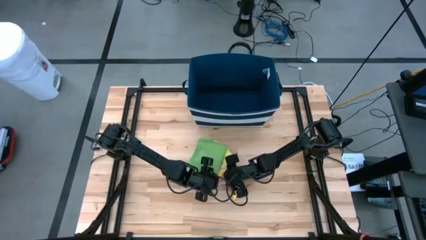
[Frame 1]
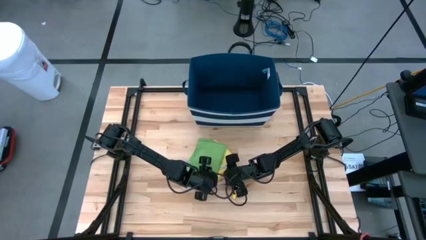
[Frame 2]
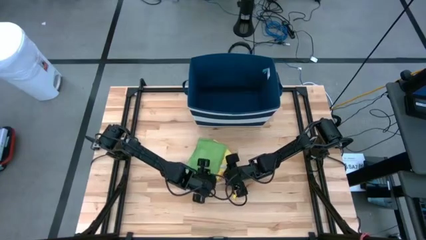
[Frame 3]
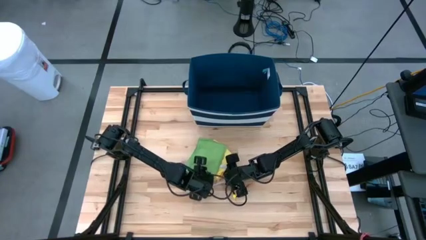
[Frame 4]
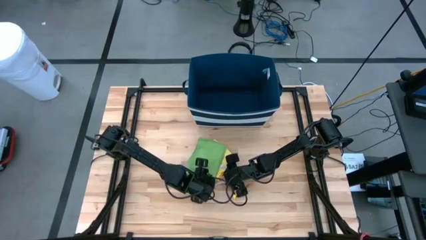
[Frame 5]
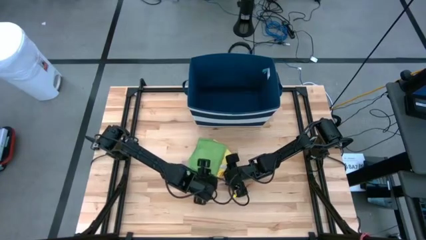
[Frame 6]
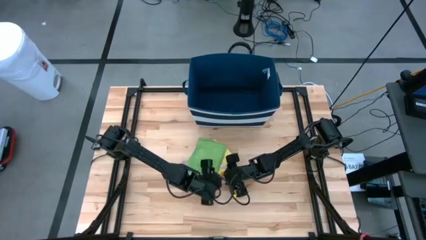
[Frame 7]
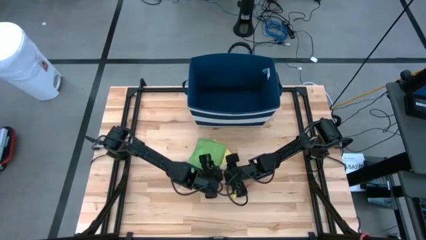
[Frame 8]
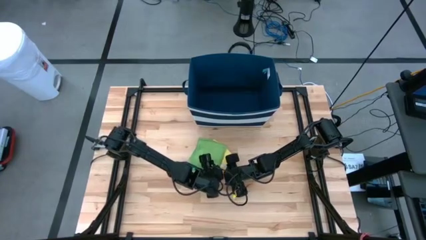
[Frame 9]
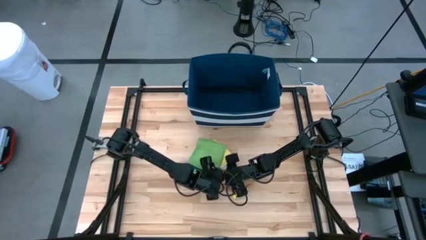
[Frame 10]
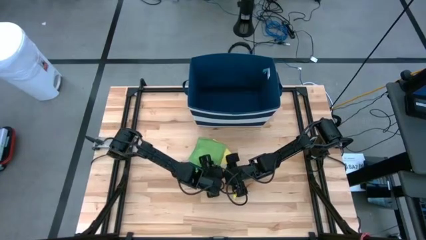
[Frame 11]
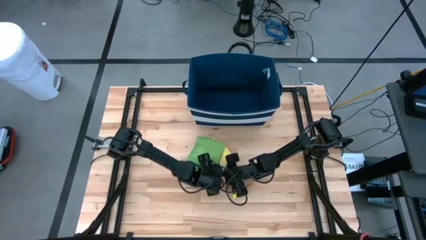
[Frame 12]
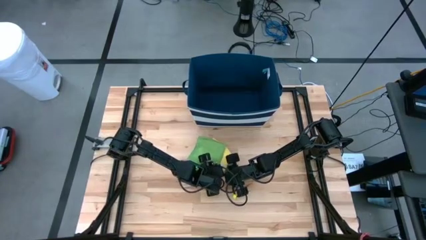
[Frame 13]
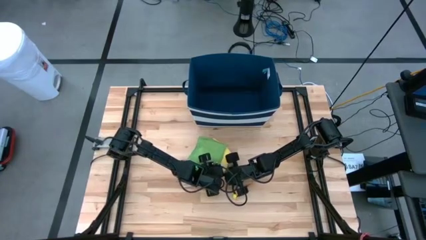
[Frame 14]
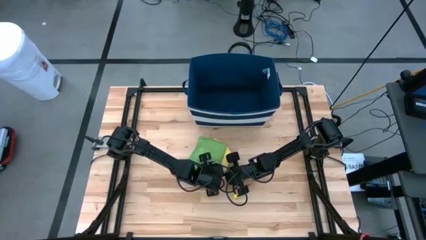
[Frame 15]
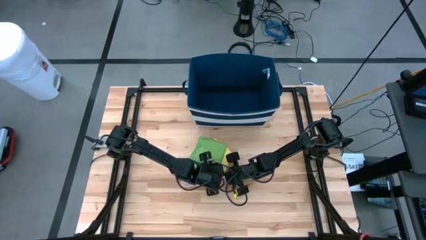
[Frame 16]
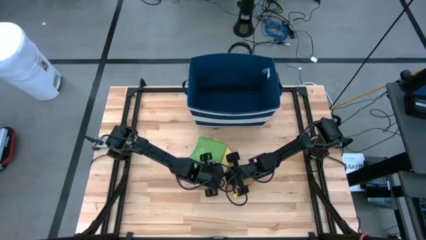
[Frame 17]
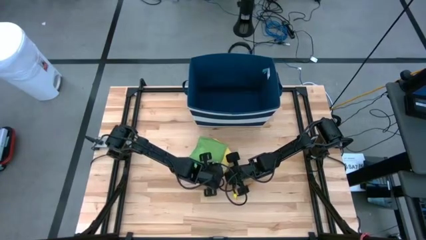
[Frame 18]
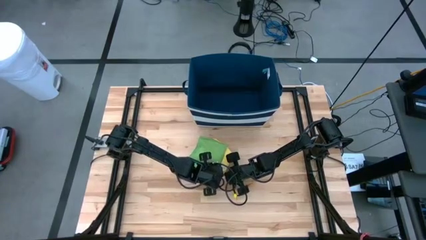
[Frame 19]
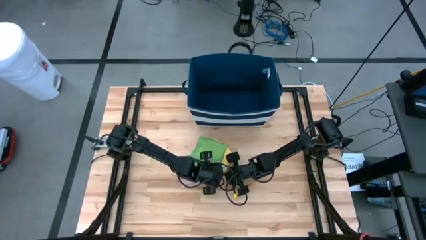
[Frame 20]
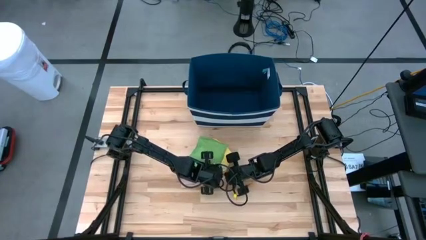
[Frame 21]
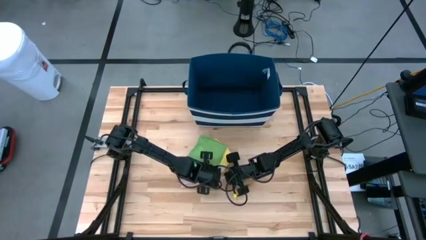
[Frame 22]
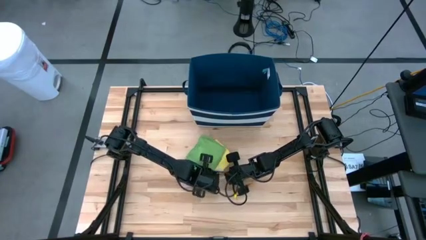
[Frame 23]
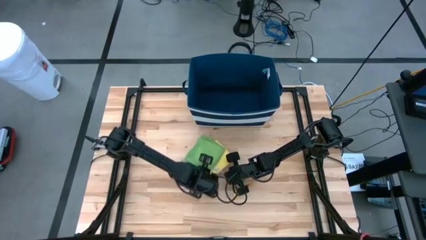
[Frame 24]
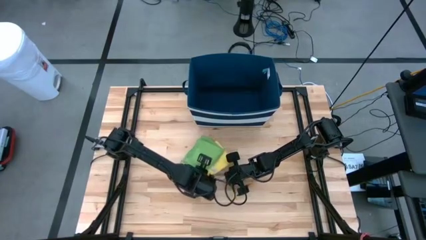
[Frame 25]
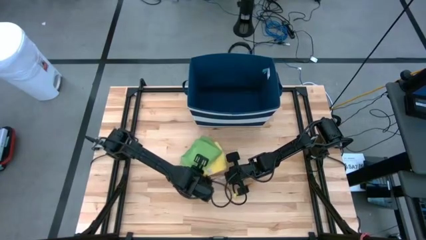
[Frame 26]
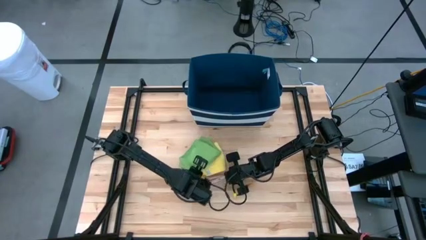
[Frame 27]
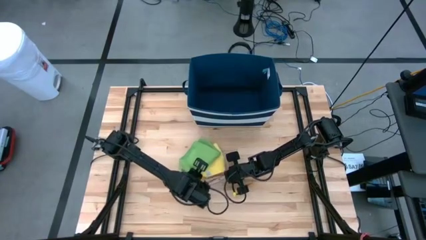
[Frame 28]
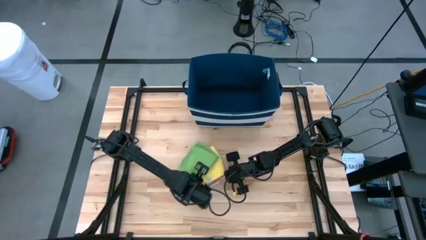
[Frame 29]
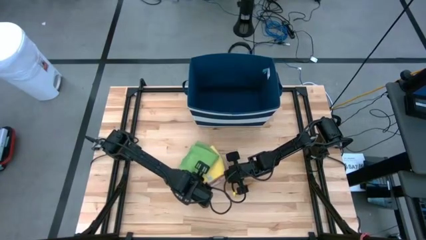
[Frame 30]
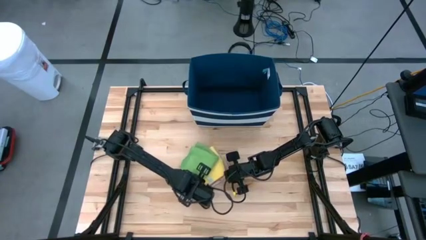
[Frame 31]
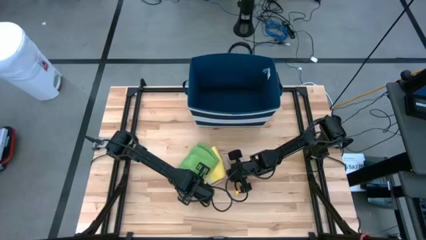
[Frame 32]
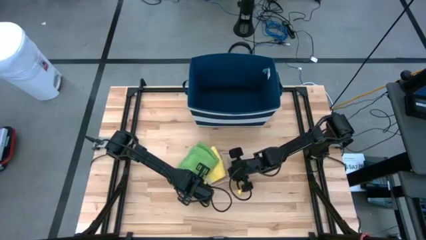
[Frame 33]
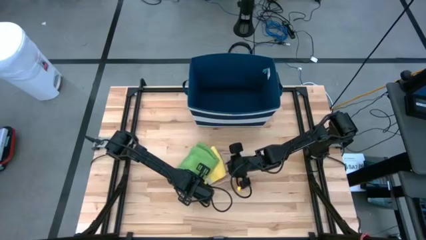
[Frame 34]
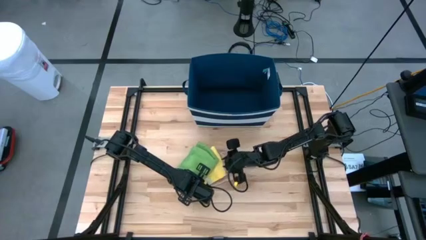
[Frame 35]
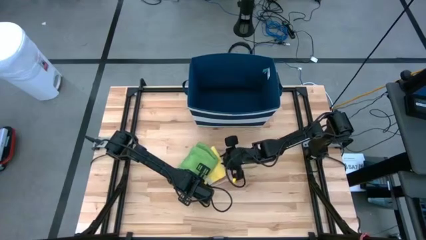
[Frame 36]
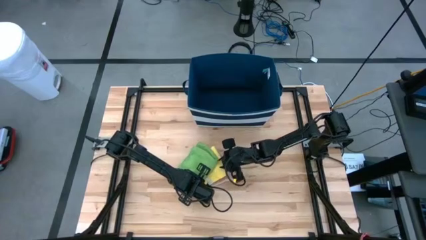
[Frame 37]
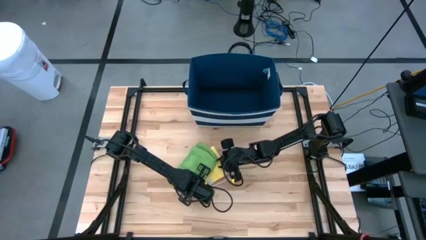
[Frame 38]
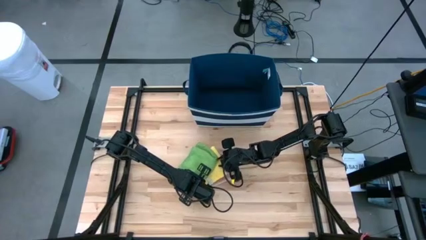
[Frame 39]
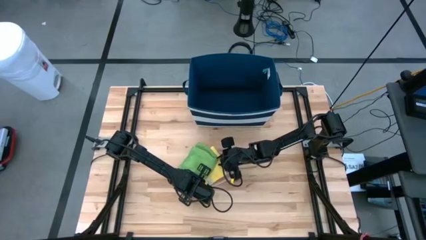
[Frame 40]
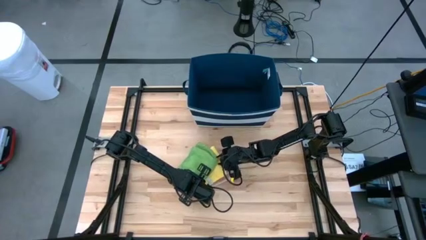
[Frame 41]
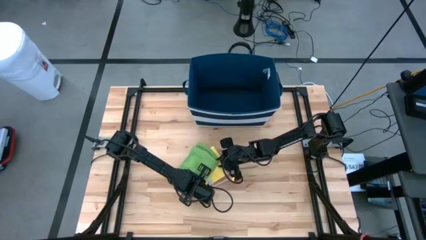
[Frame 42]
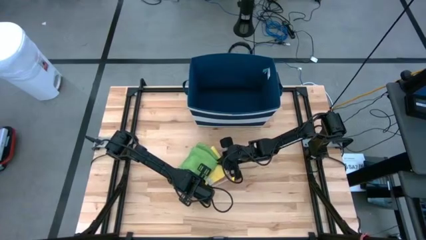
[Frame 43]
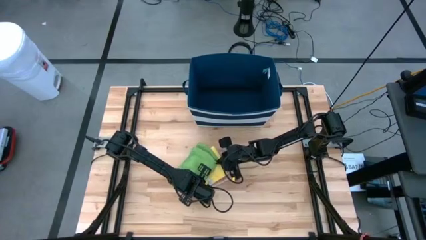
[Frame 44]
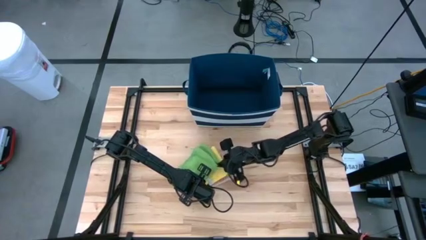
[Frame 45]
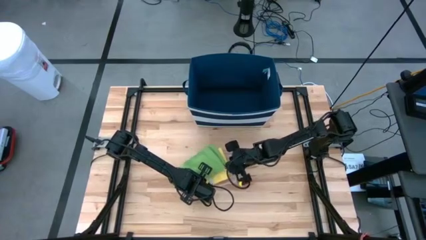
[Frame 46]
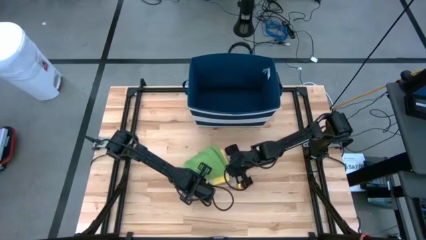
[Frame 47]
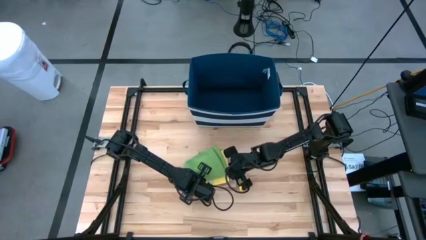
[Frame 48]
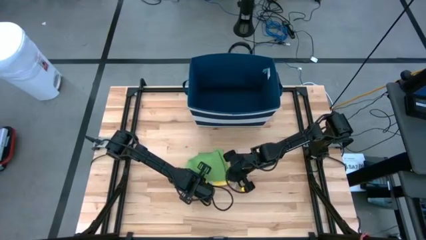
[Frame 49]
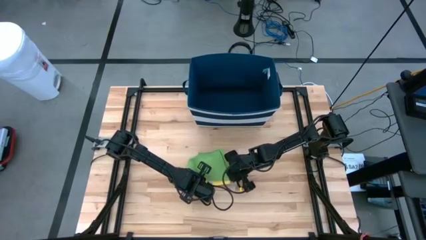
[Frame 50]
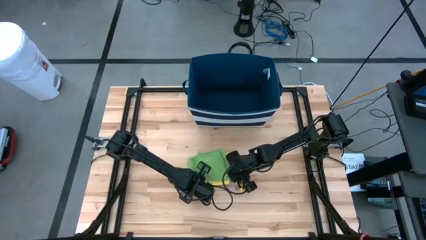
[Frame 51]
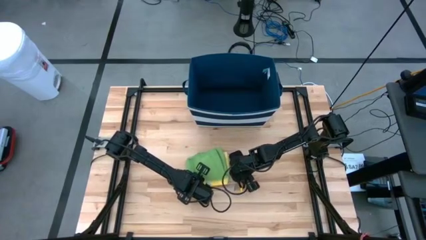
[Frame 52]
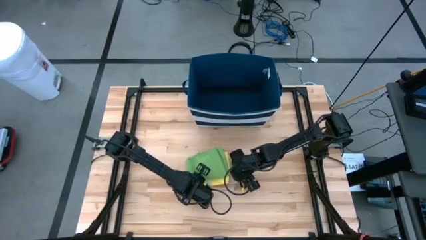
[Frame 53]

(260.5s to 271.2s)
Task: Fold towel
Stack the folded towels on the light brown towel

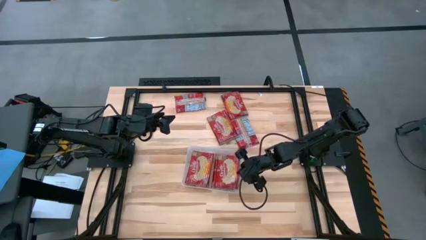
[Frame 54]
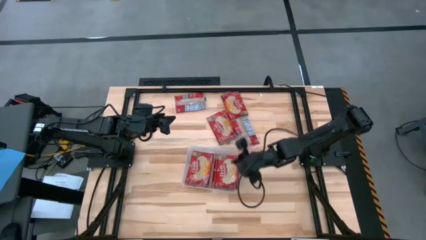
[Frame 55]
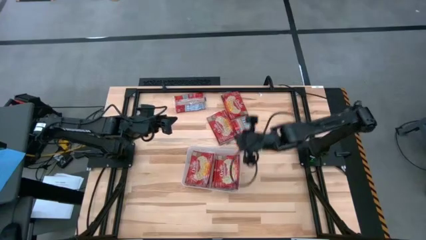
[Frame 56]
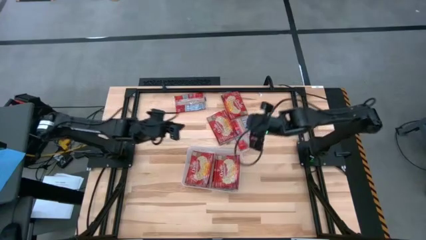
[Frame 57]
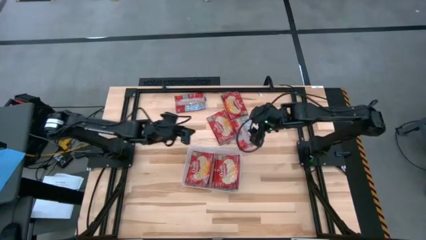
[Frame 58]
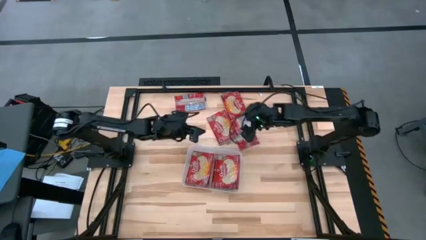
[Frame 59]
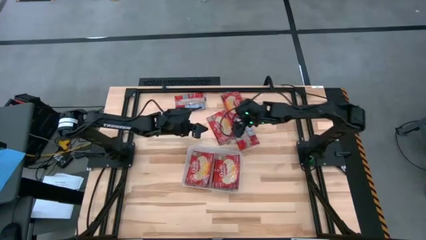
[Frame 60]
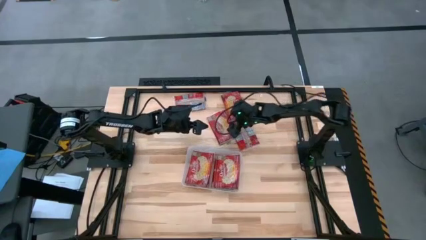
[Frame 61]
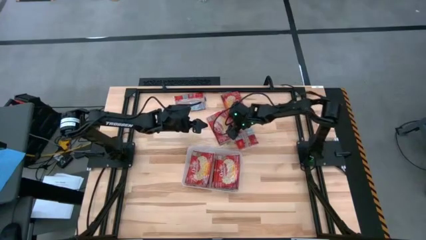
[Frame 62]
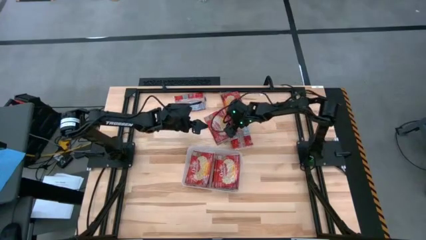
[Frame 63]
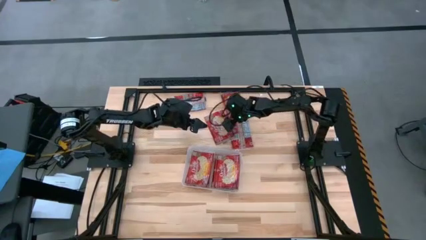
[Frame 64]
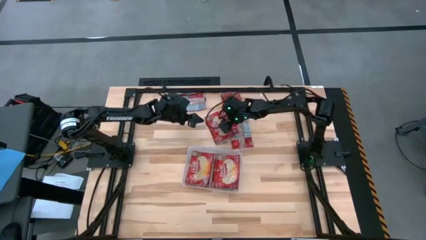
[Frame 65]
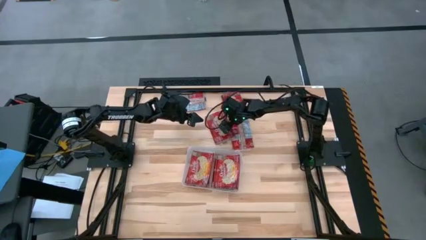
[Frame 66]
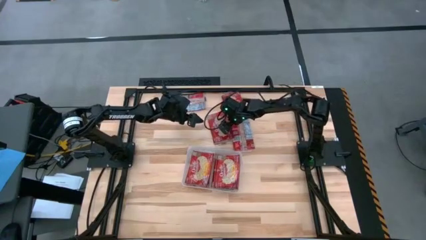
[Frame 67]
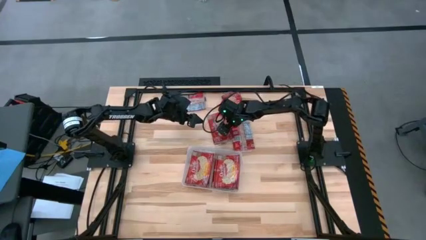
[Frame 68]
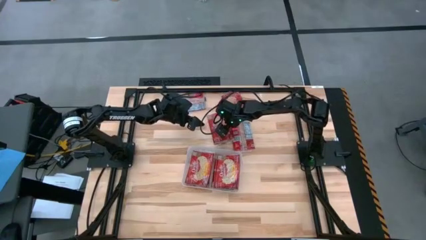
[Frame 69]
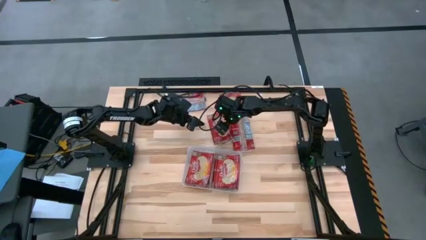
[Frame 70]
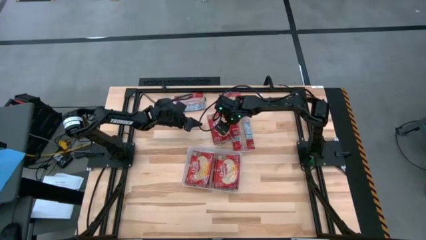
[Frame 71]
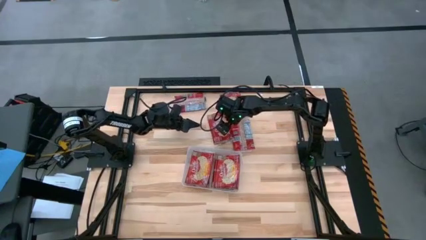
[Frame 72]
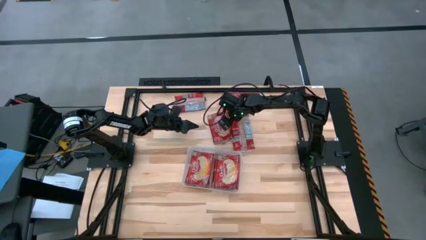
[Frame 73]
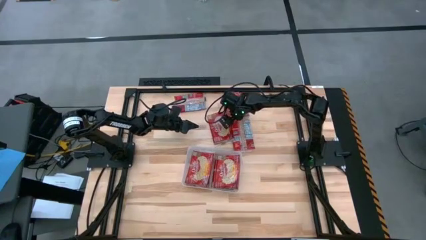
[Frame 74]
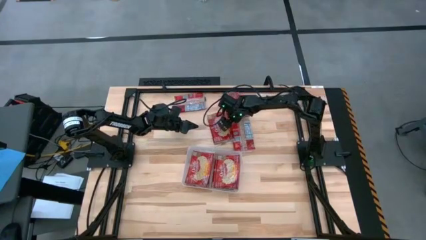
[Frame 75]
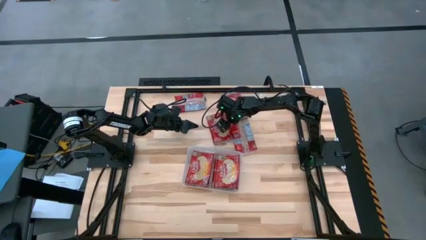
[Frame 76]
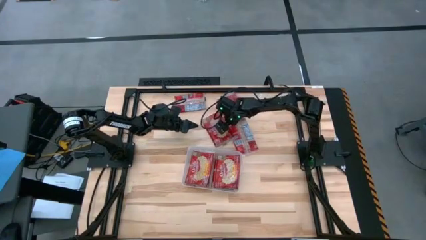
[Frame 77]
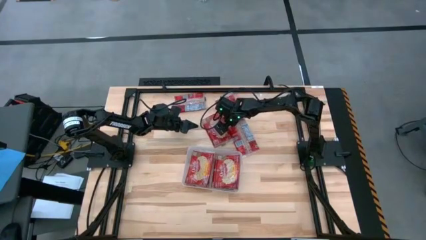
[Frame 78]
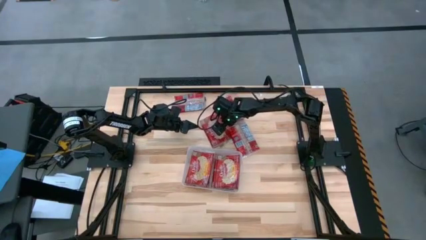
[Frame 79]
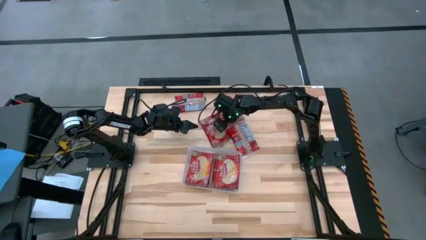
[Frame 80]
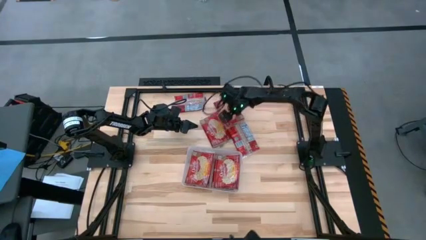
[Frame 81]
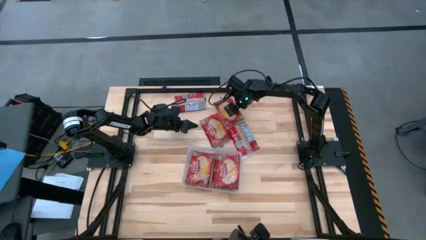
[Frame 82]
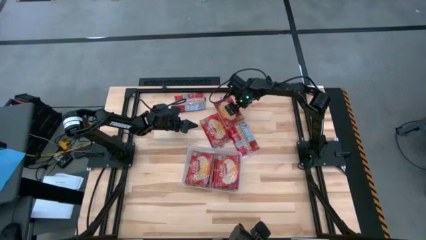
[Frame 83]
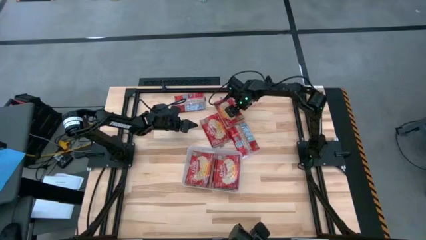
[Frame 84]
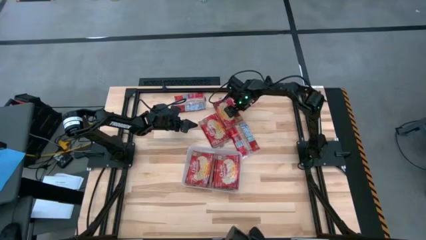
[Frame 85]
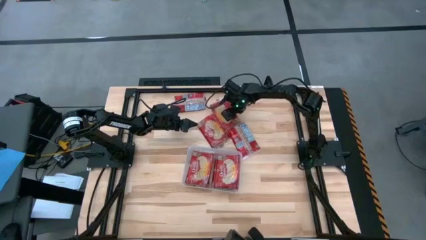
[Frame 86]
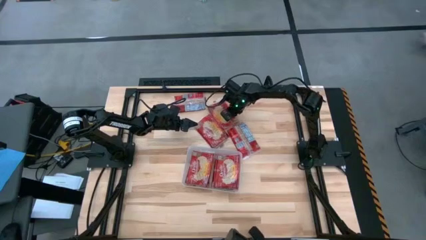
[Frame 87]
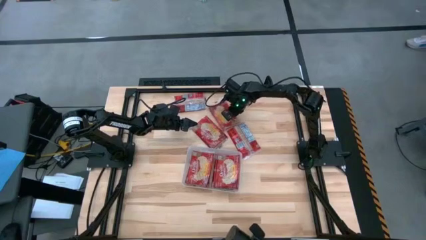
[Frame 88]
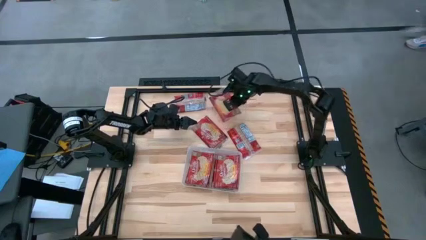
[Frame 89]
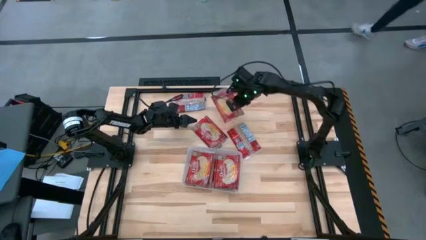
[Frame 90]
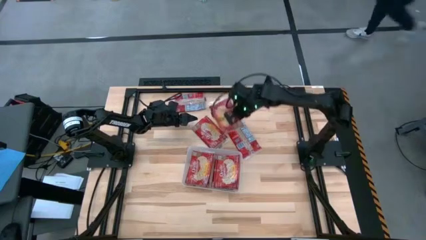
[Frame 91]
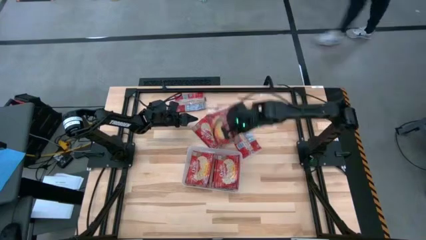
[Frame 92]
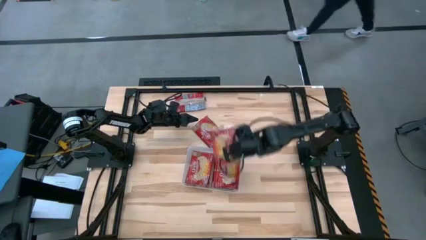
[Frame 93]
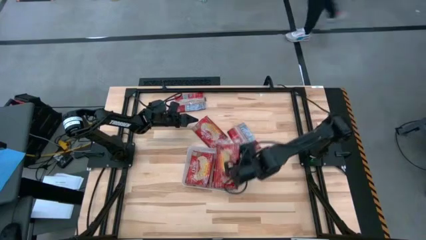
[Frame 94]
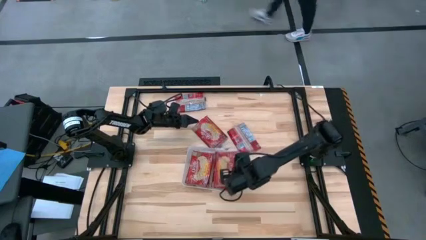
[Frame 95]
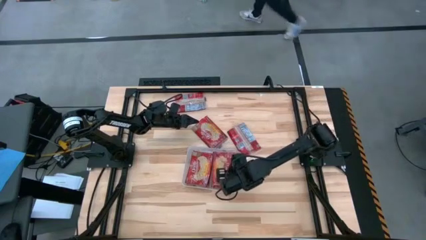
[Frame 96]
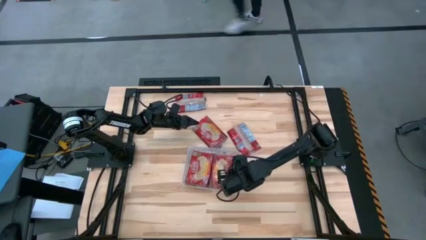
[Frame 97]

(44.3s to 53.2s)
Task: Sort popcorn bags into baskets
Put the red popcorn bag into the transparent bin
